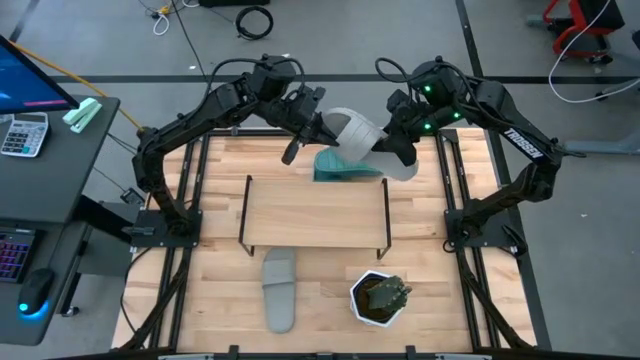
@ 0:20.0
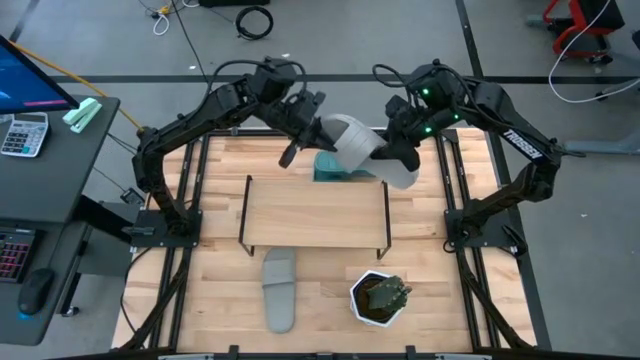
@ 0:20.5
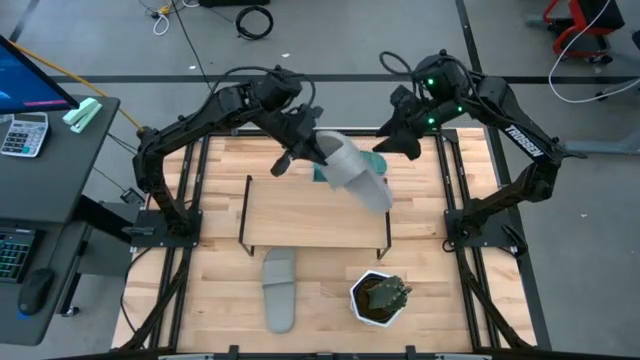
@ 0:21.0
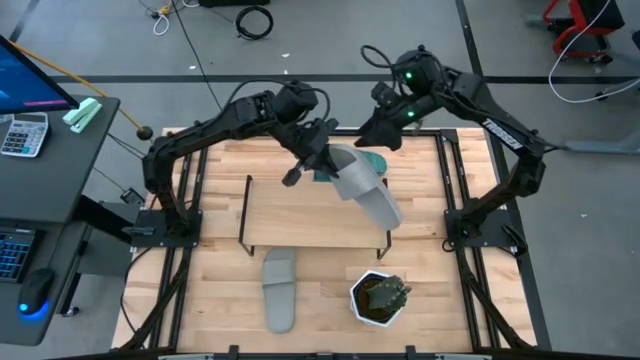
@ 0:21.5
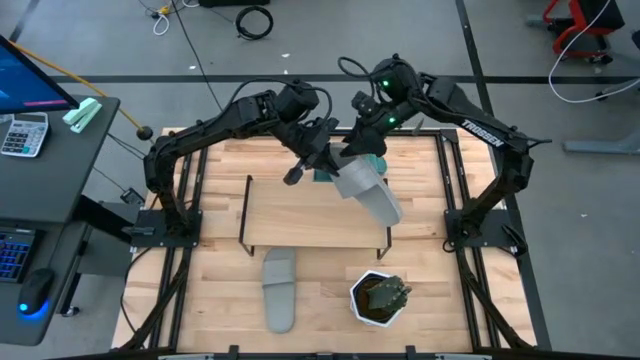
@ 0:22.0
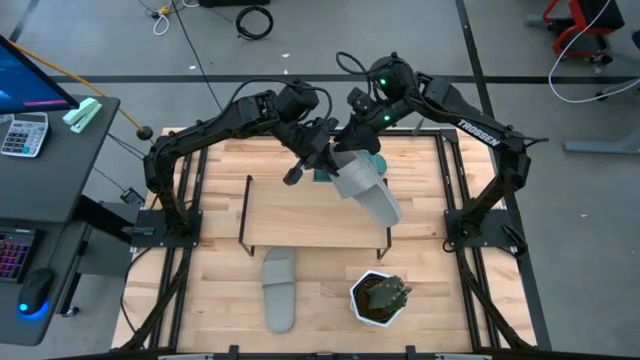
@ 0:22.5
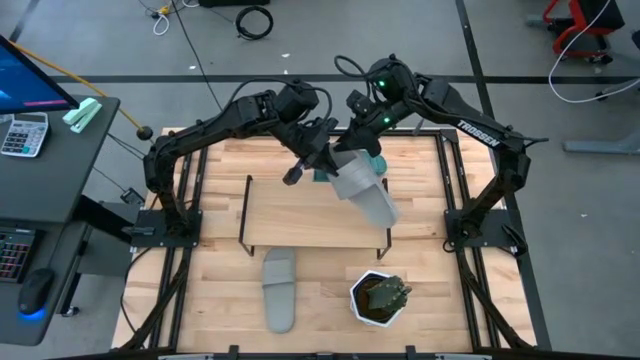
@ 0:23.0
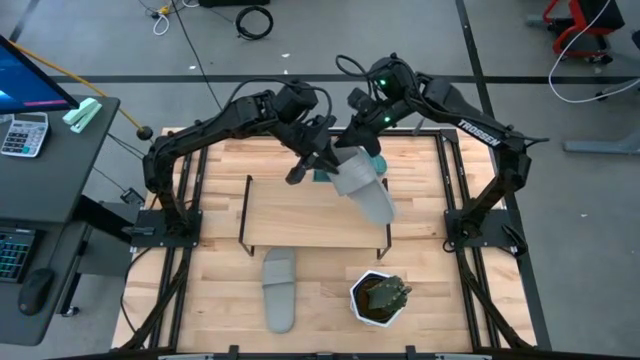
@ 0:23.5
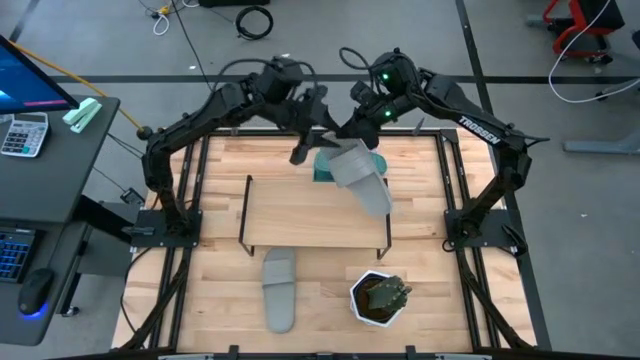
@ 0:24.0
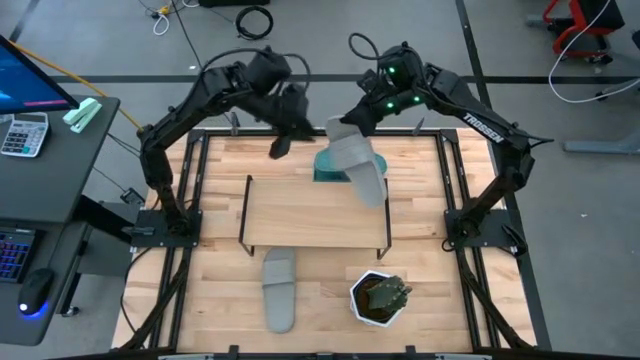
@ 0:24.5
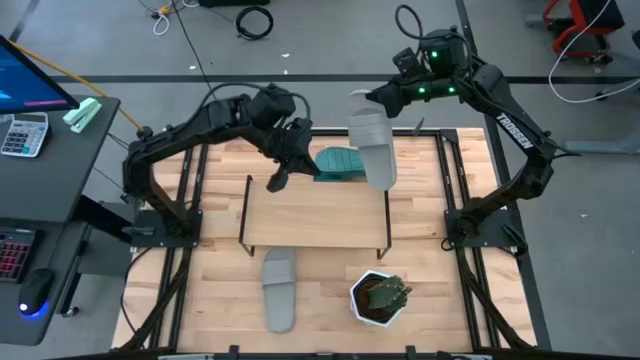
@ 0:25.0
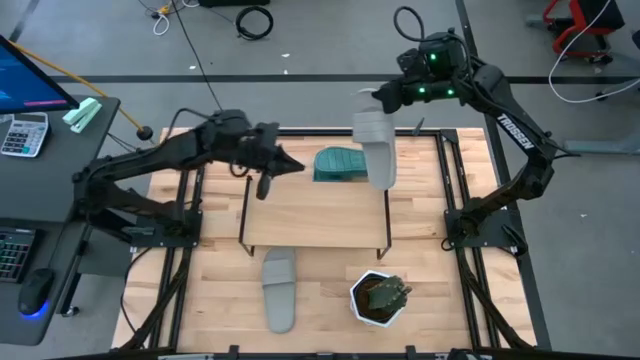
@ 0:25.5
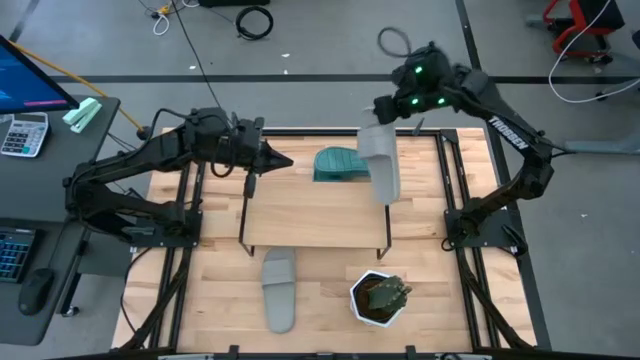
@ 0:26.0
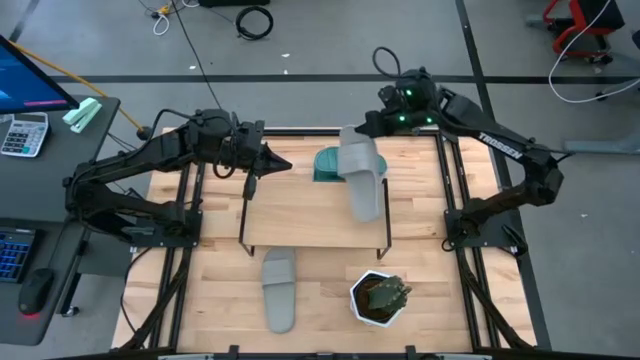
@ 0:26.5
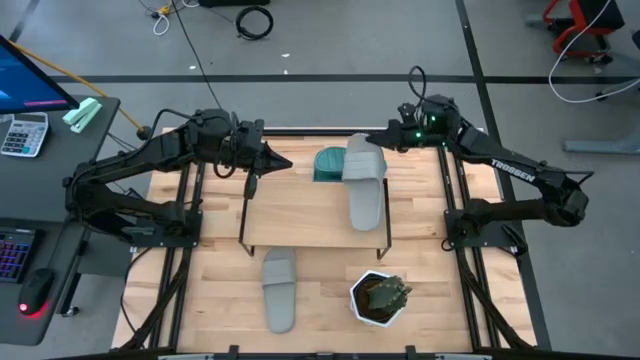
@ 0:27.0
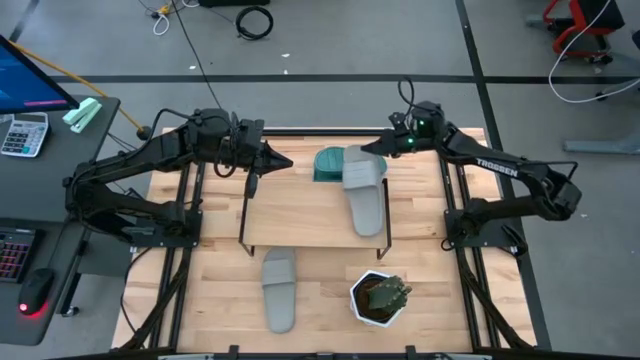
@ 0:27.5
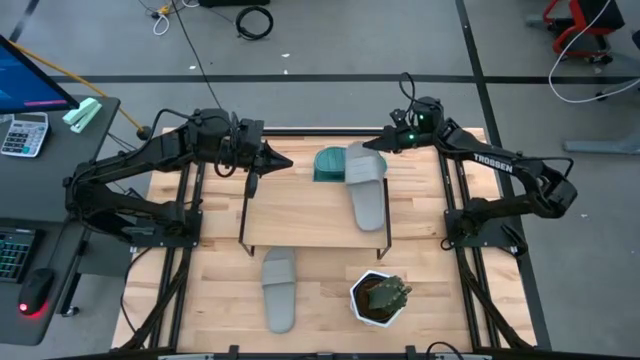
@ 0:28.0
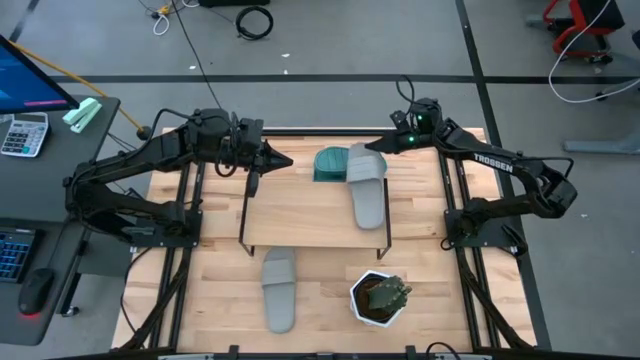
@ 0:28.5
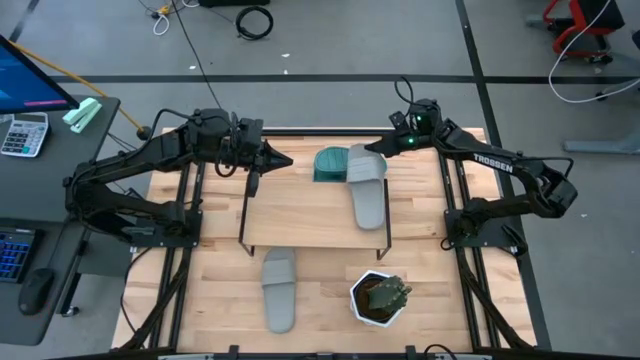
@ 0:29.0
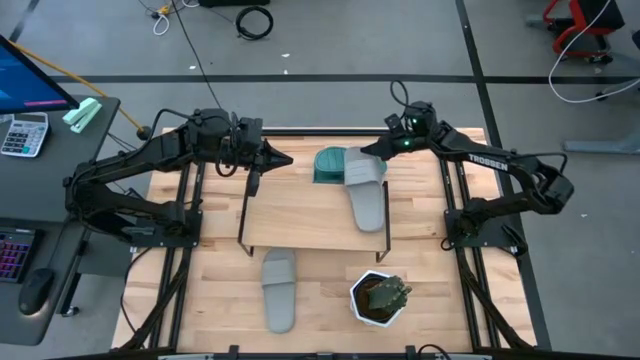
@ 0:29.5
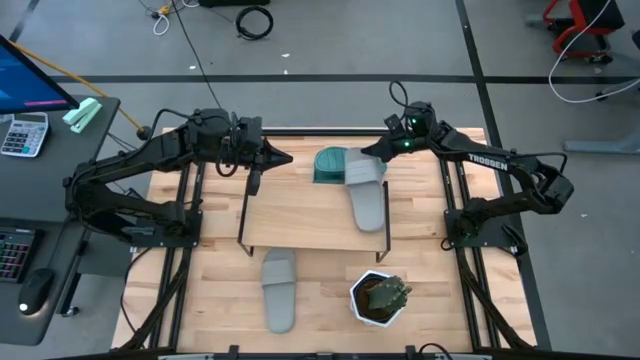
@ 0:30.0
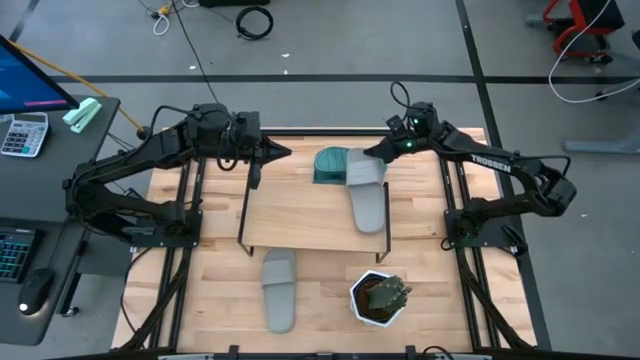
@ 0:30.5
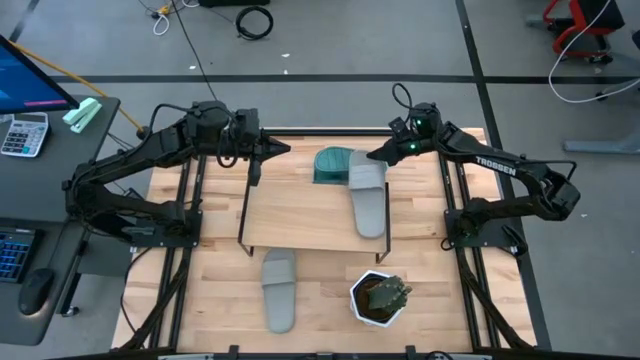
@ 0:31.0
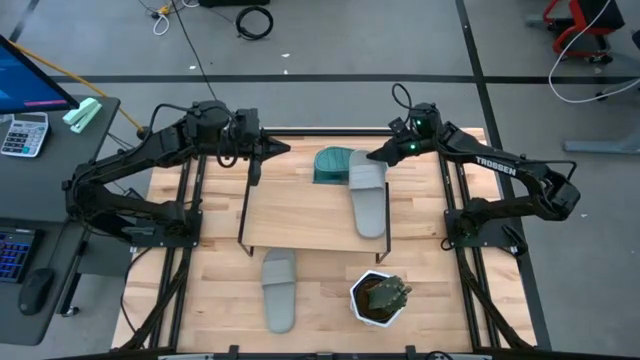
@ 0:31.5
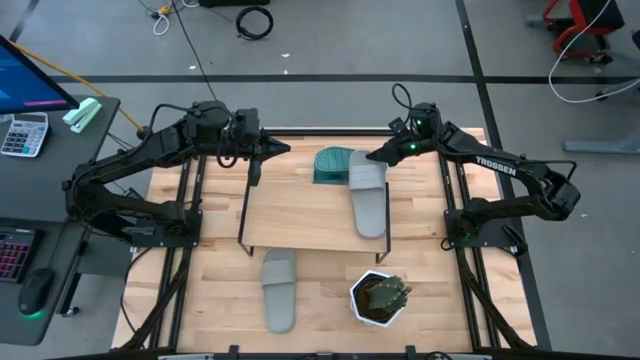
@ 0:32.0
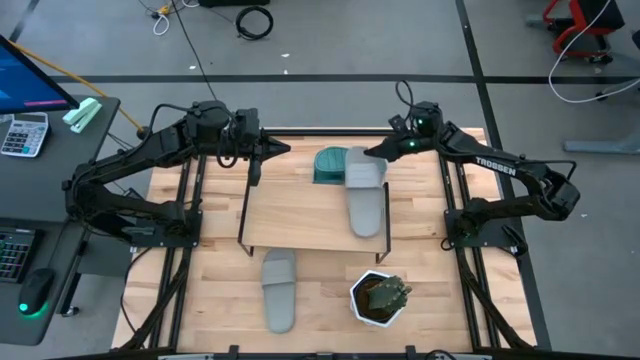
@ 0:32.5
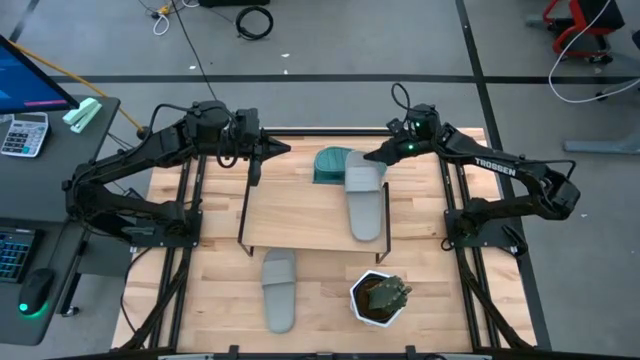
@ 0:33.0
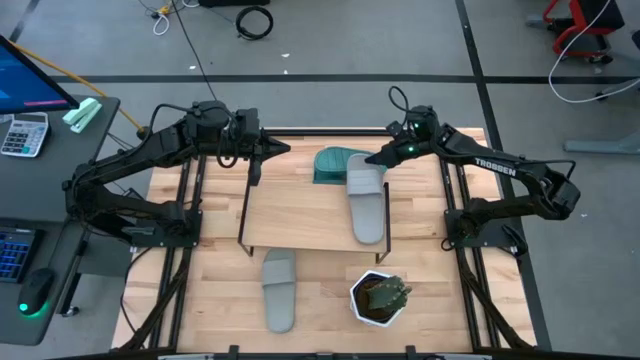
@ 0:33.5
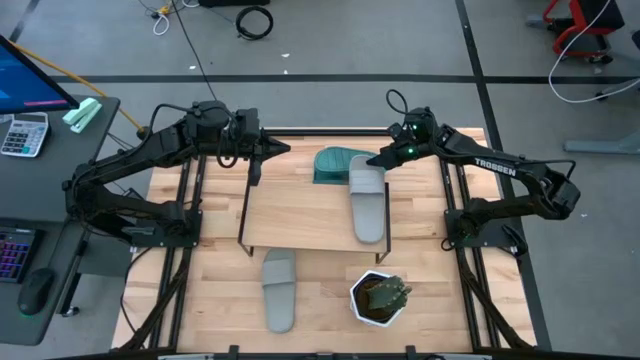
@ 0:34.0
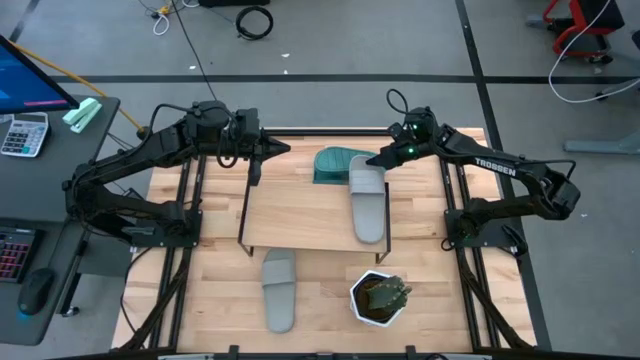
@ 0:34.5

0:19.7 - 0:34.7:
Task: Pick and place slides into the shelf
Put the bottom gray slipper on the shelf

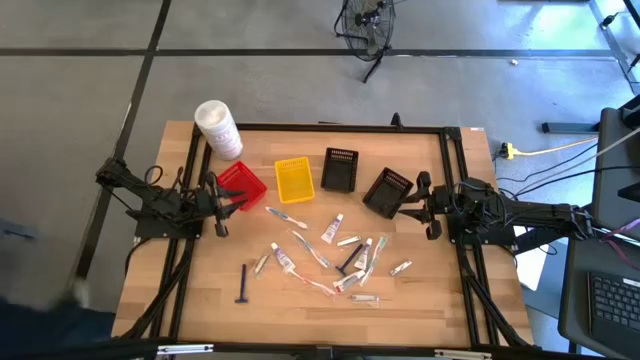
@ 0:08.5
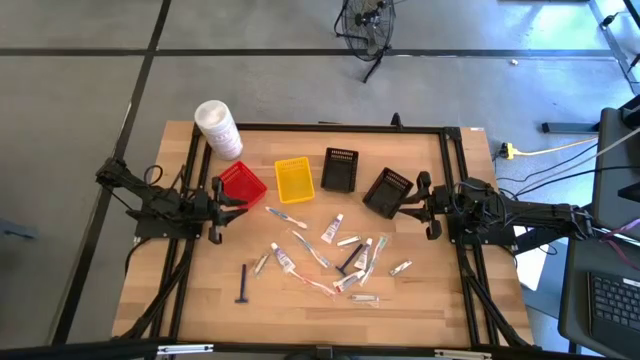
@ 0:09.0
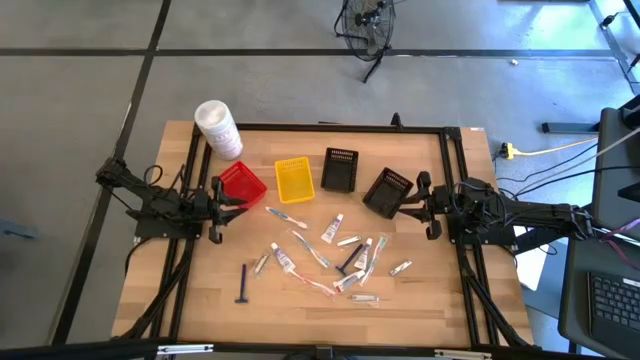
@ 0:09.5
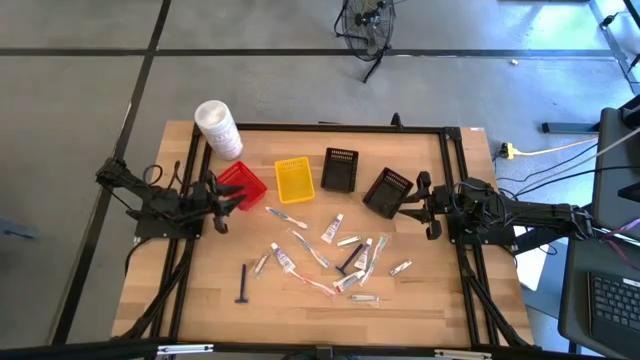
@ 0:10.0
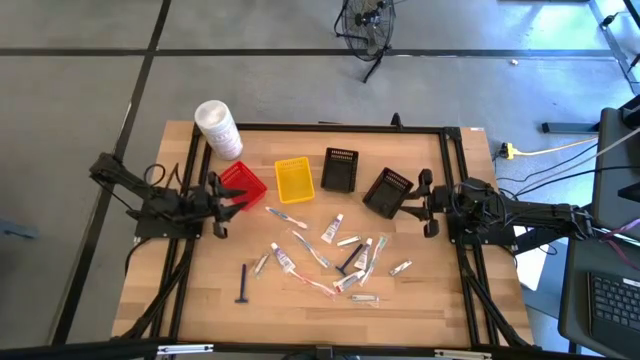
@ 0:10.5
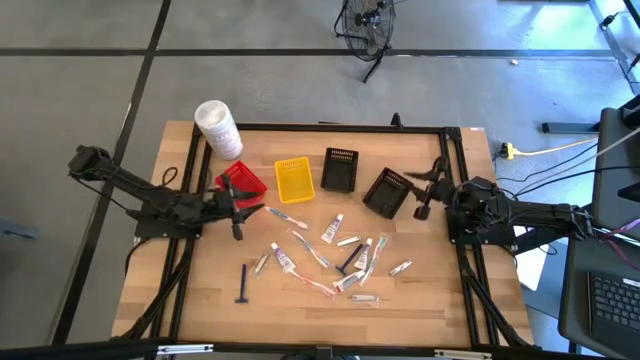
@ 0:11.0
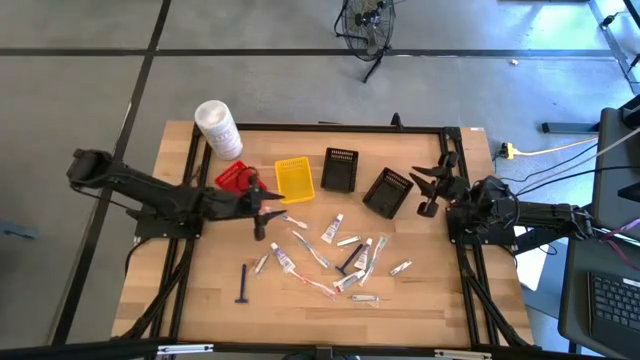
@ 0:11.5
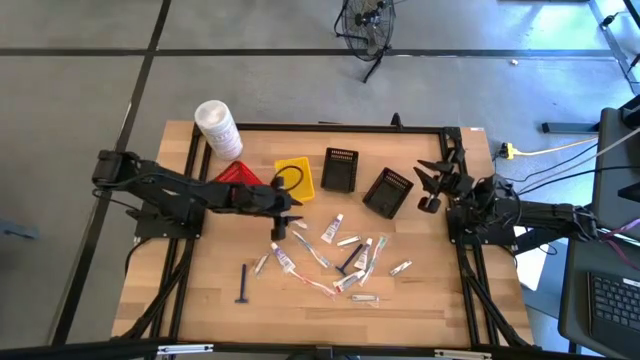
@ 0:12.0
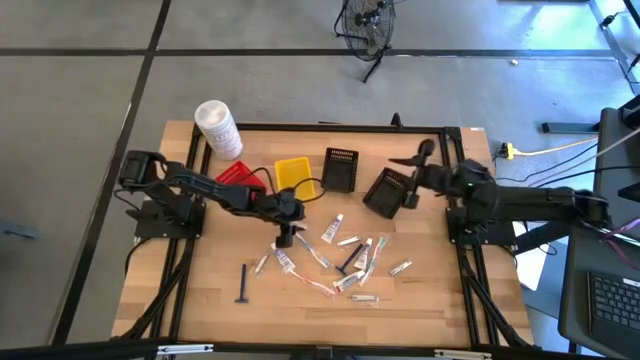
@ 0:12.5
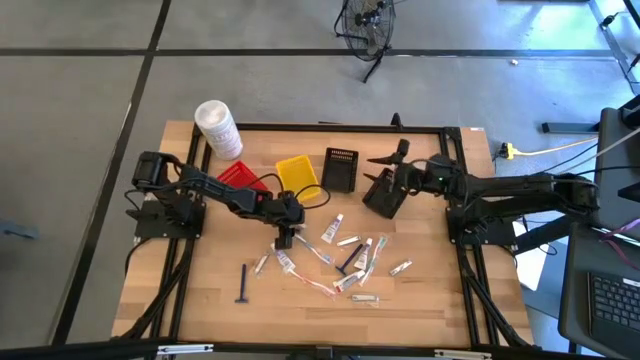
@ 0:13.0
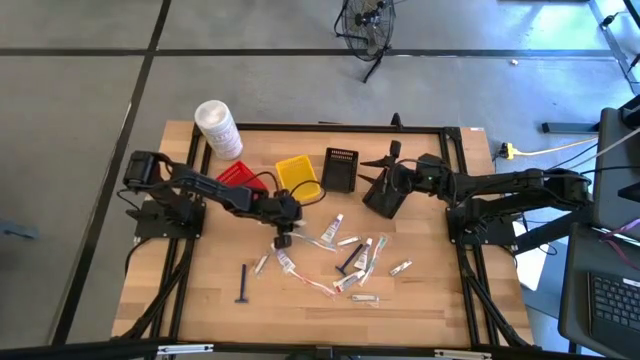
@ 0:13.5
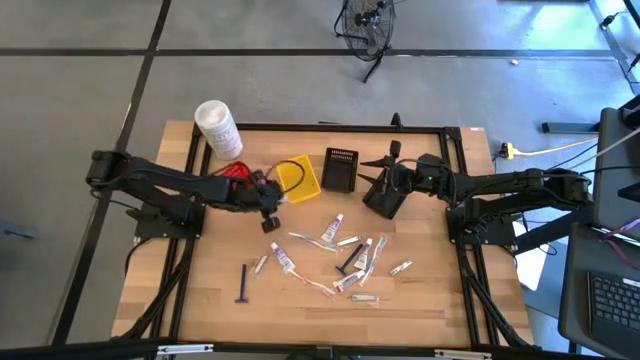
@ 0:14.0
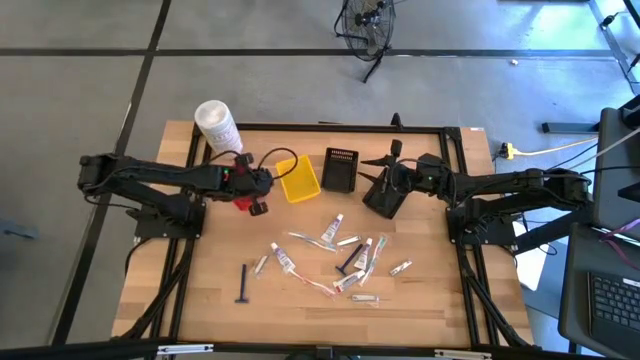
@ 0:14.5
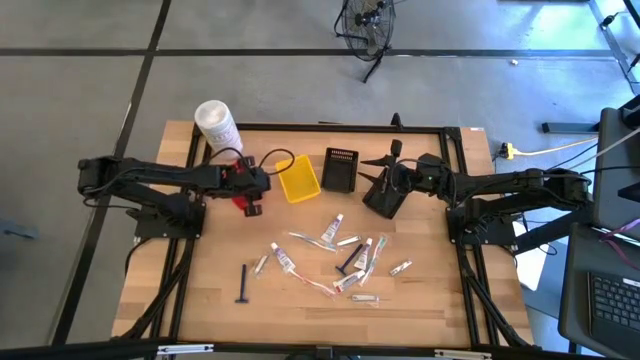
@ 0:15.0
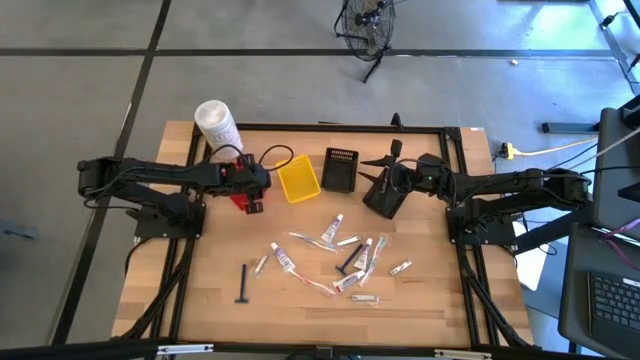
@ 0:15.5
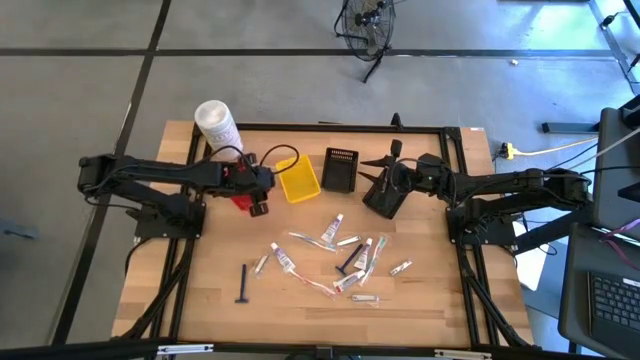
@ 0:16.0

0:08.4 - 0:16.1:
Task: Pick & Place Travel size toiletries
Put the blue toothbrush into the red bin
